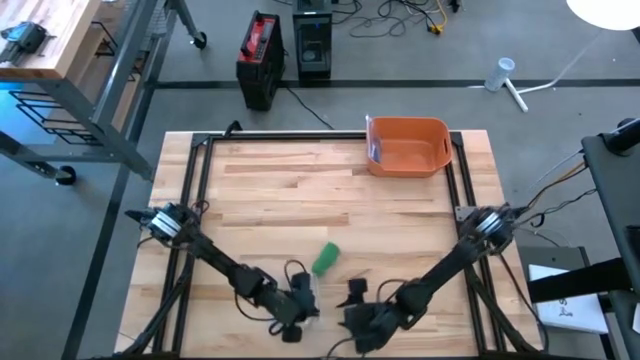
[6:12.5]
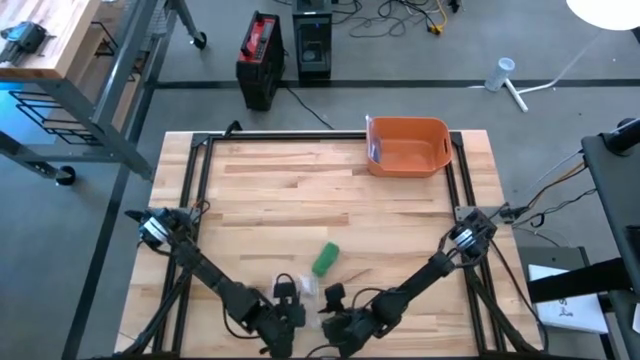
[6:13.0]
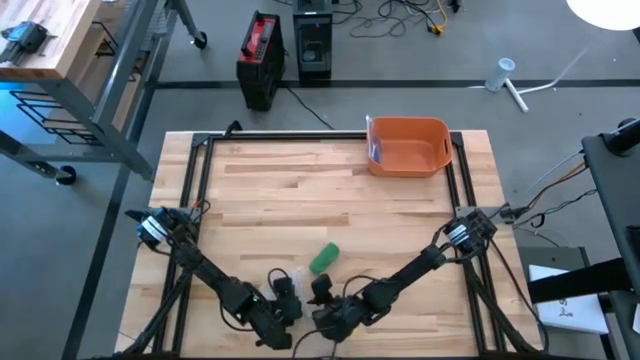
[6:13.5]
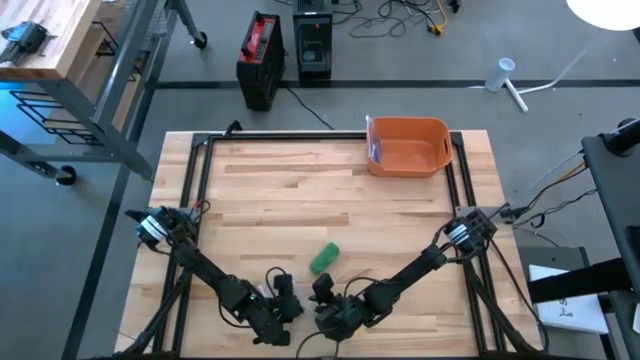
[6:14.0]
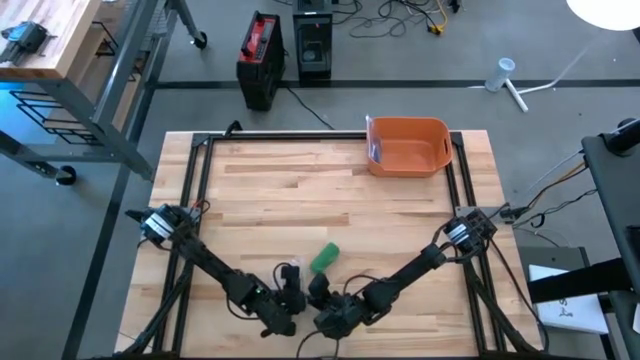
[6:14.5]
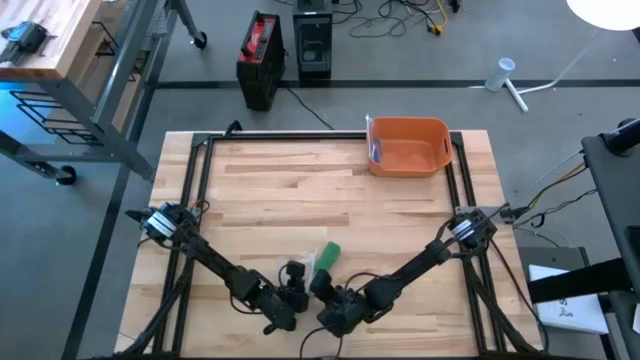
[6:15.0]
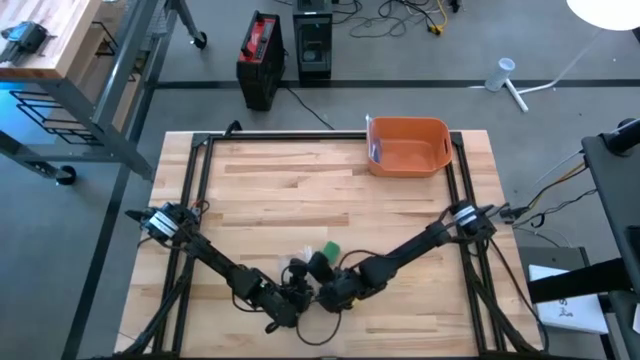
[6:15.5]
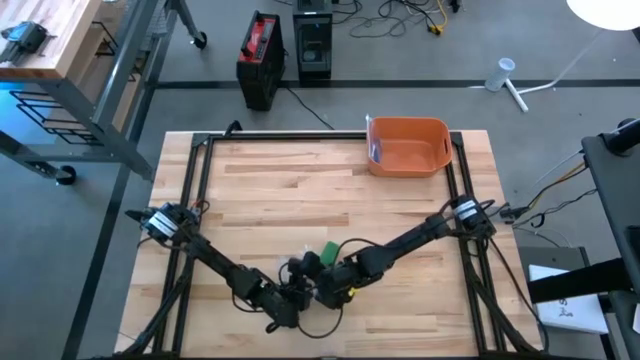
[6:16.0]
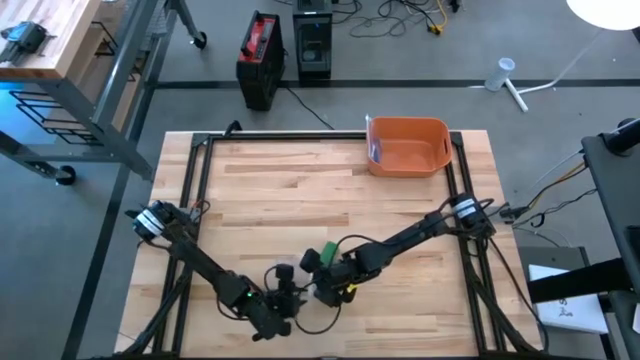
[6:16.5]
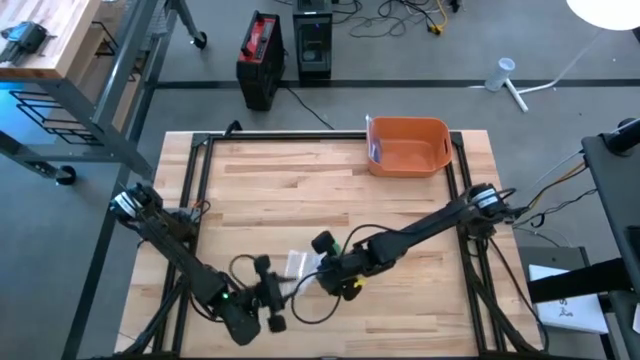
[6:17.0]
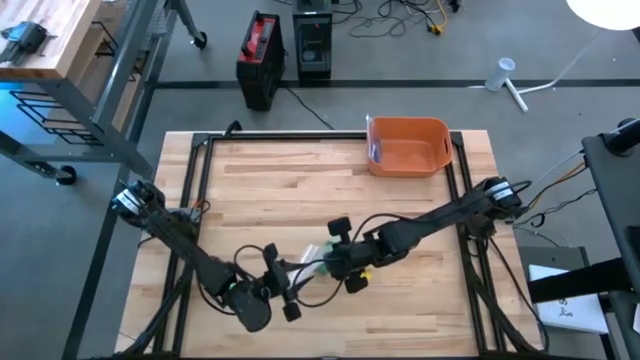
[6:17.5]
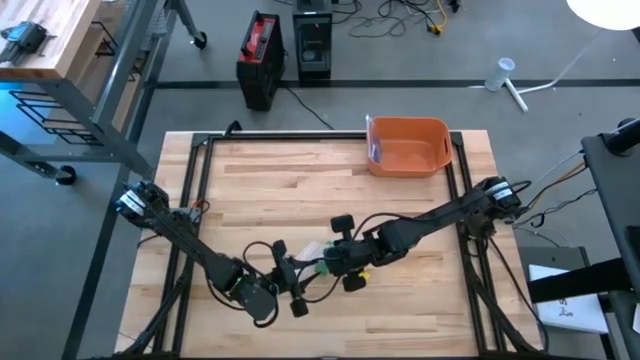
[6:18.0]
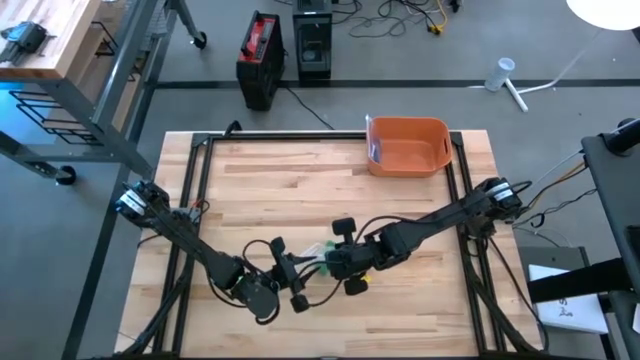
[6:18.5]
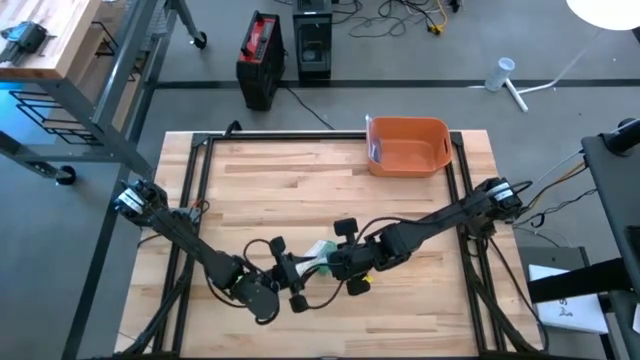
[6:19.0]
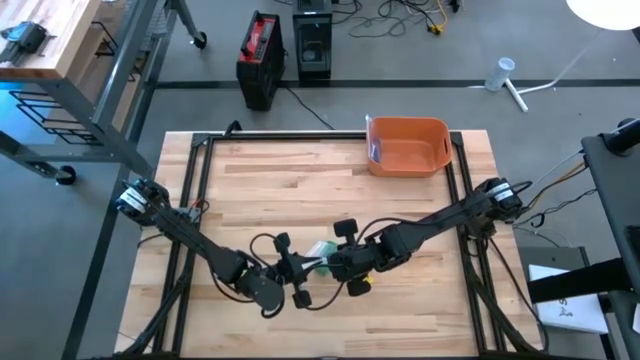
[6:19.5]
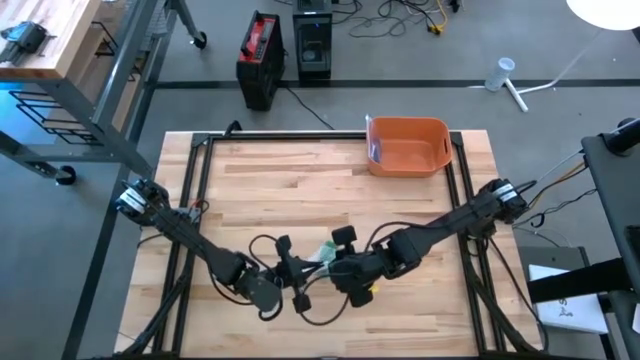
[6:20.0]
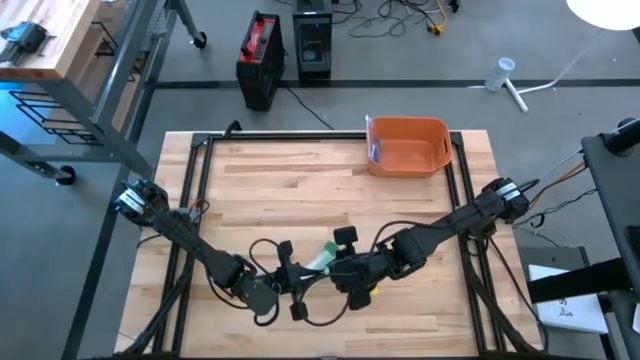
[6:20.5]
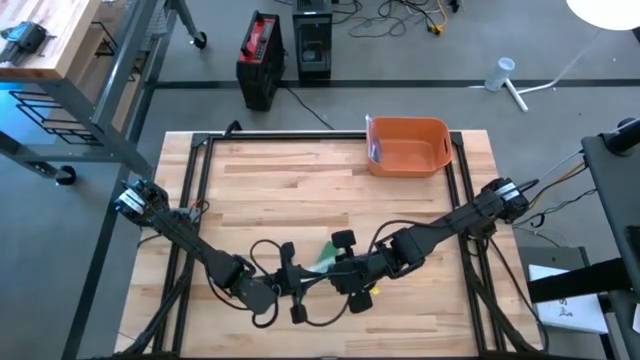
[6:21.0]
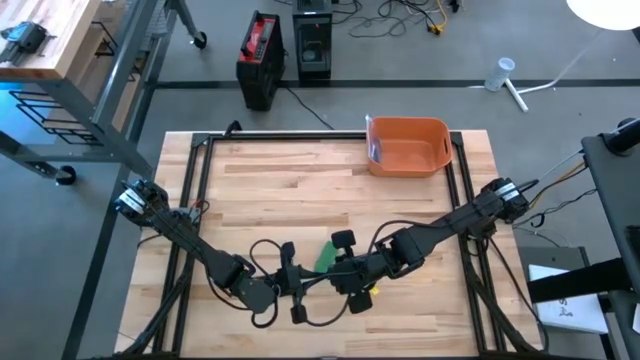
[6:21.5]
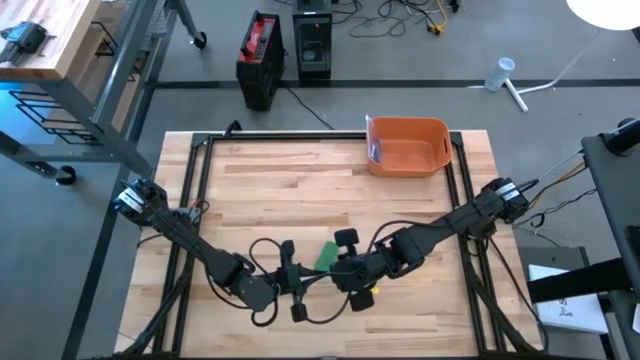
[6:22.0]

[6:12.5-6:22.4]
Task: Roll bandage
Open the transparent zip bag

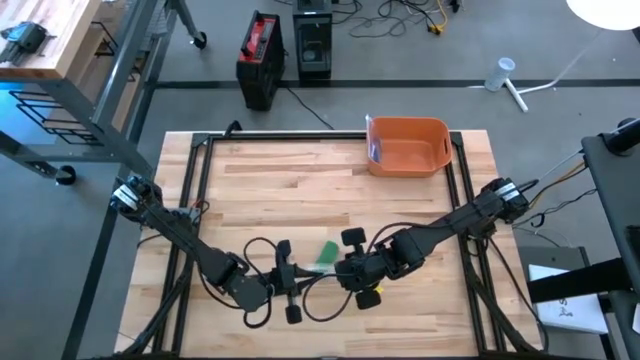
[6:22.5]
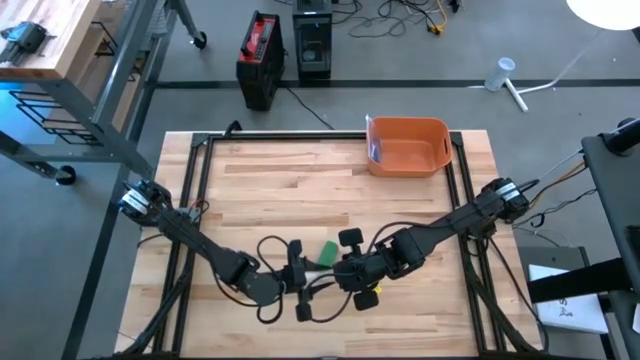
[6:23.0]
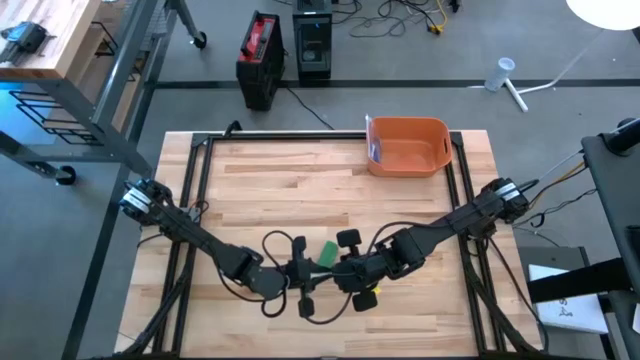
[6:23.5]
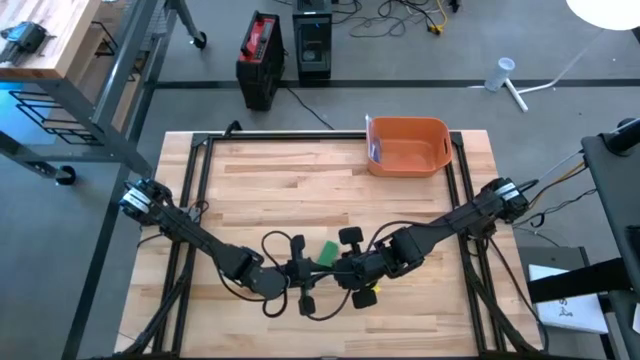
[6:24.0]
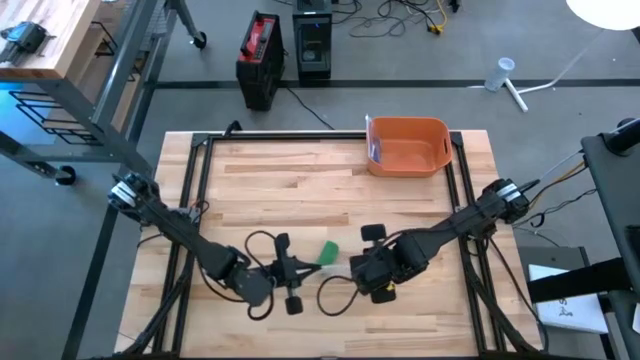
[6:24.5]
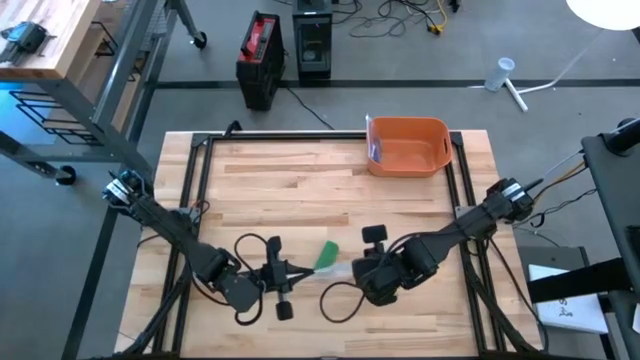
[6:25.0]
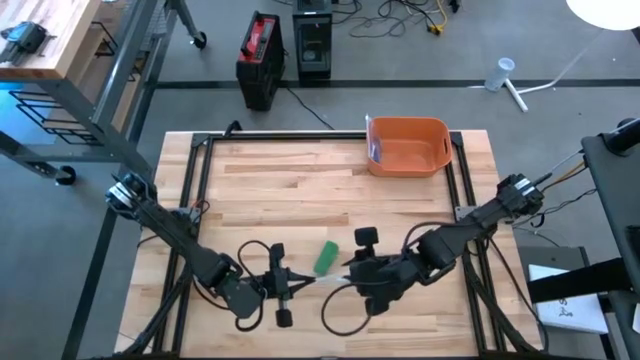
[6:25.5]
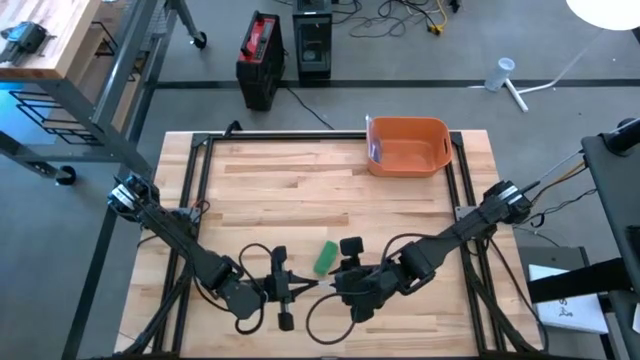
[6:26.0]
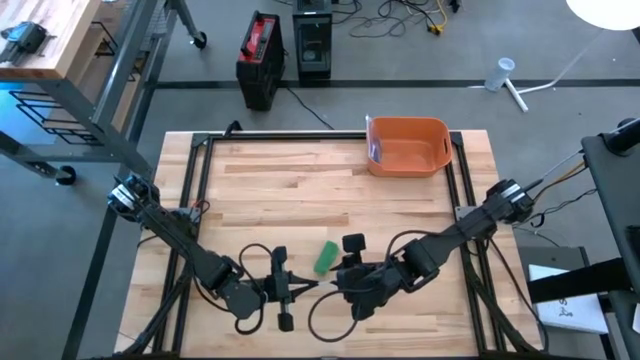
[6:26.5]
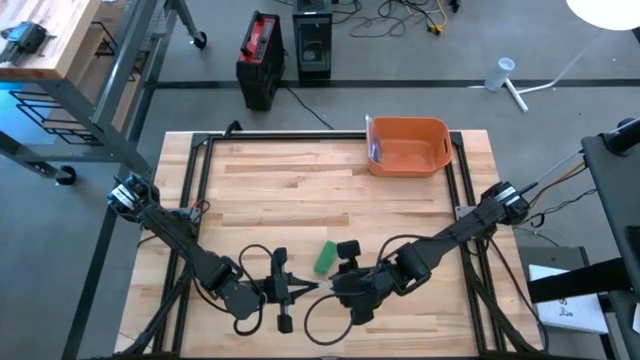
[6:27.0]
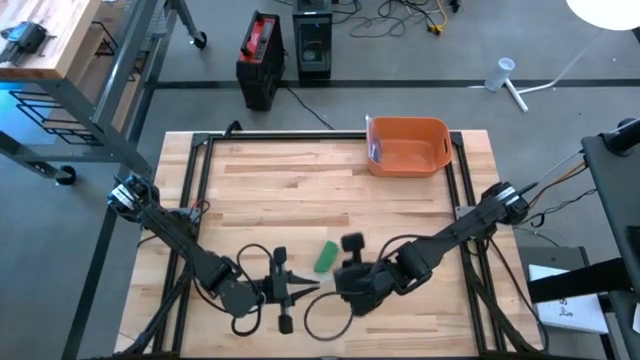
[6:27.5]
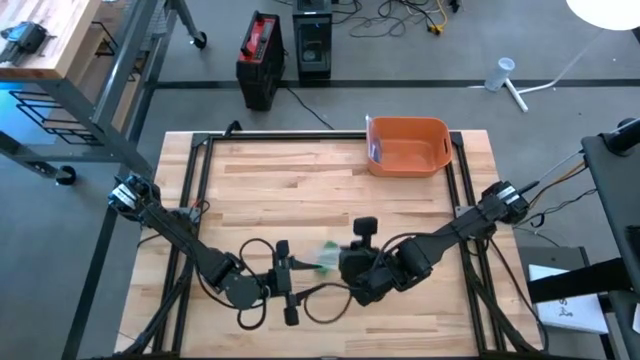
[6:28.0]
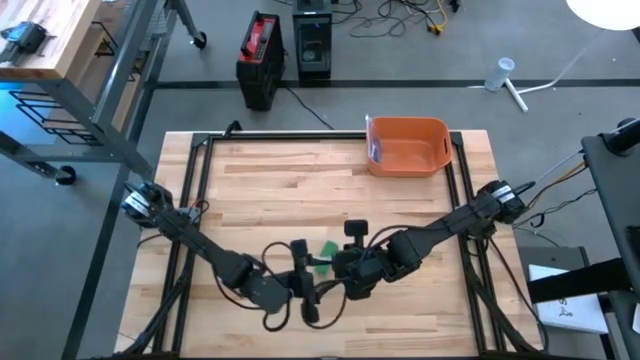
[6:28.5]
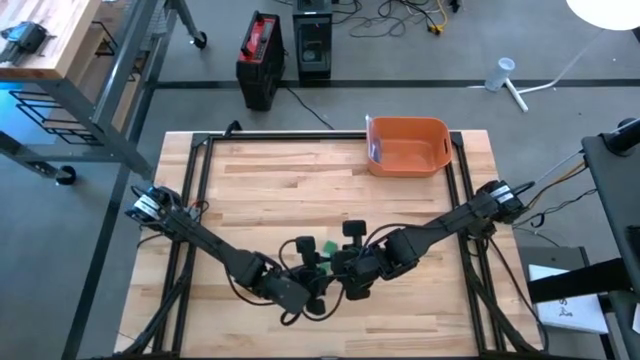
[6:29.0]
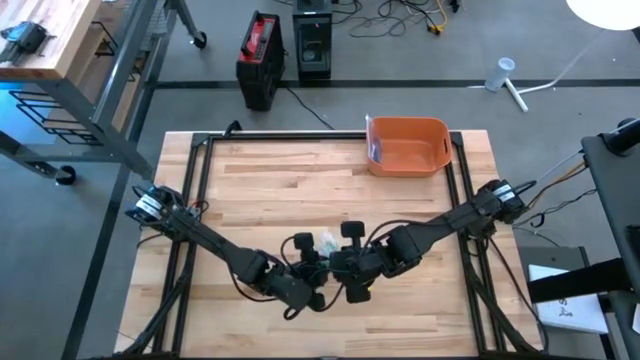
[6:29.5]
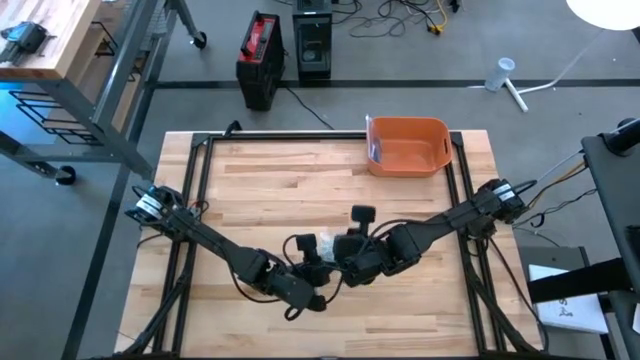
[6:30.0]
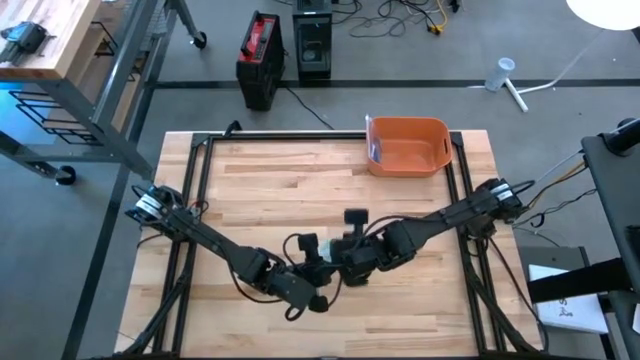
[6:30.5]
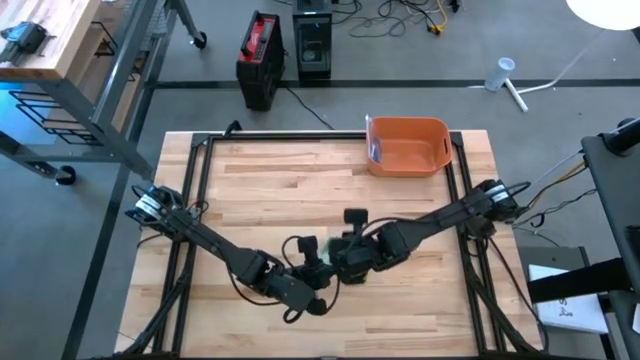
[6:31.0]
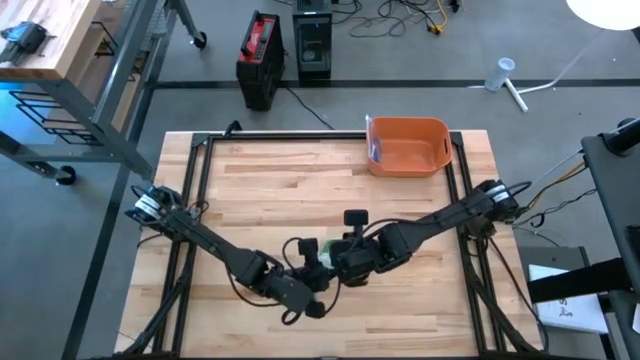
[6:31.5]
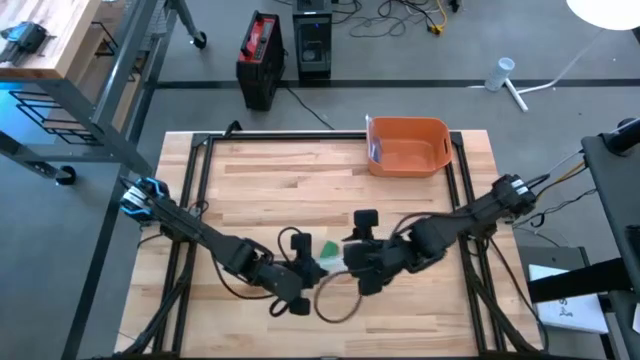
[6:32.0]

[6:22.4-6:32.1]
Open the transparent zip bag
